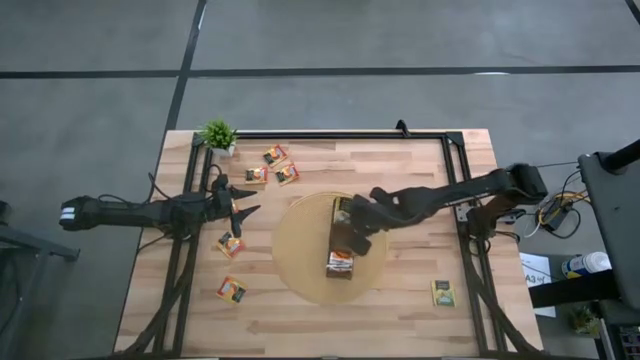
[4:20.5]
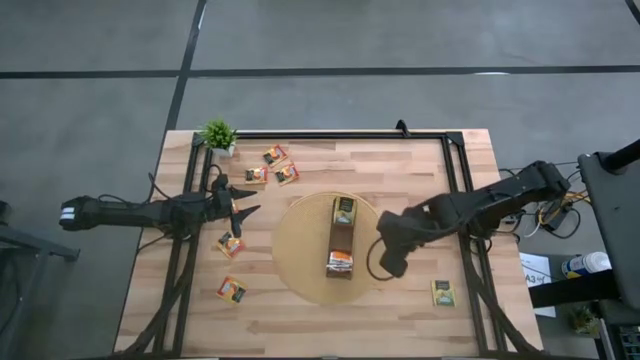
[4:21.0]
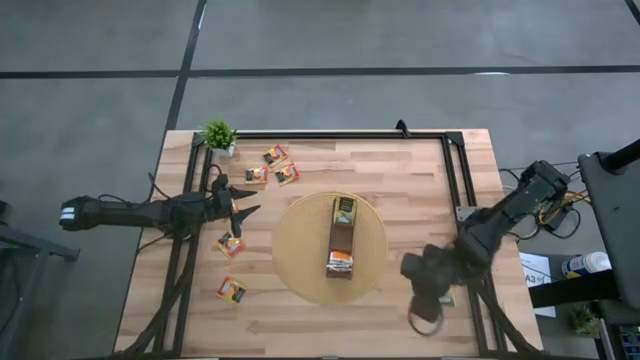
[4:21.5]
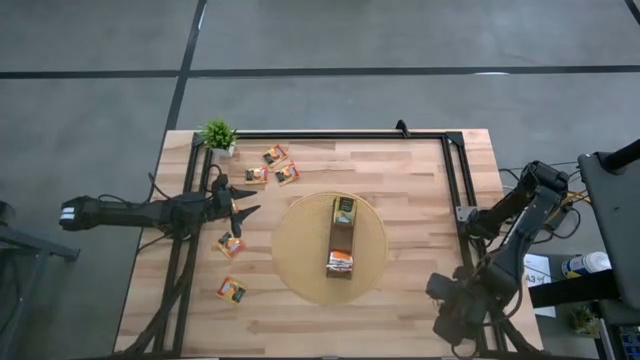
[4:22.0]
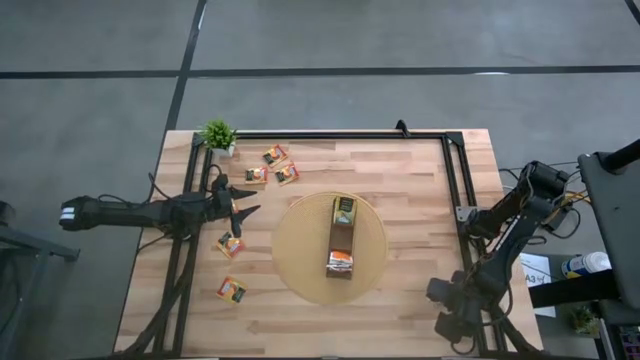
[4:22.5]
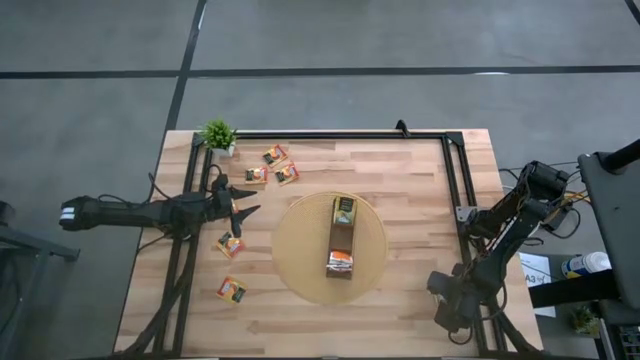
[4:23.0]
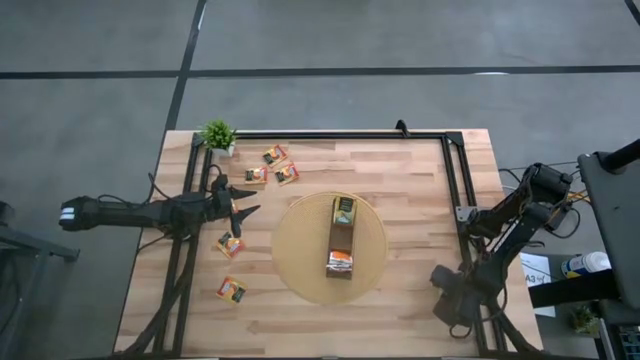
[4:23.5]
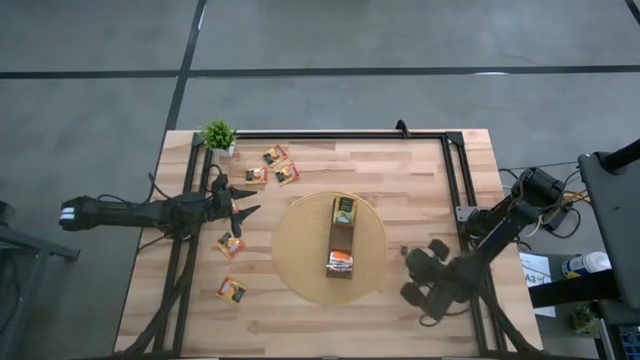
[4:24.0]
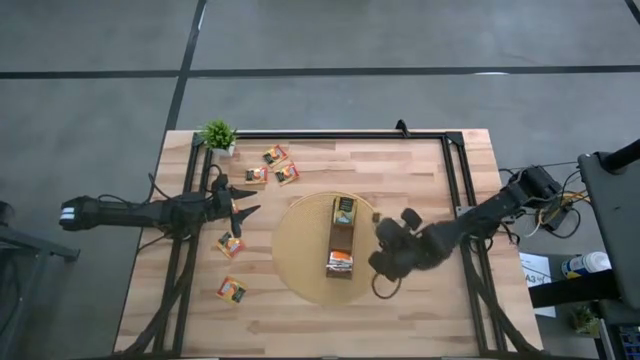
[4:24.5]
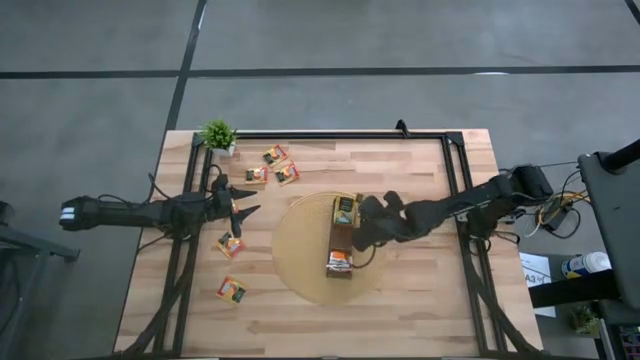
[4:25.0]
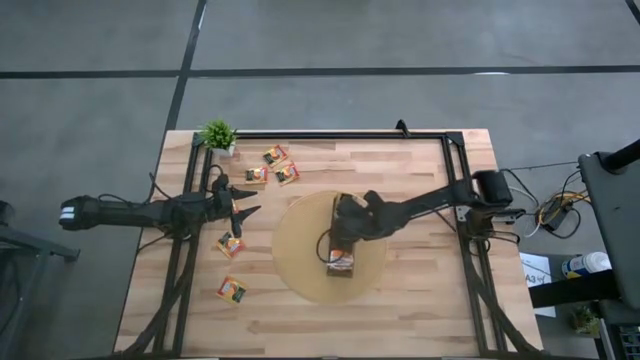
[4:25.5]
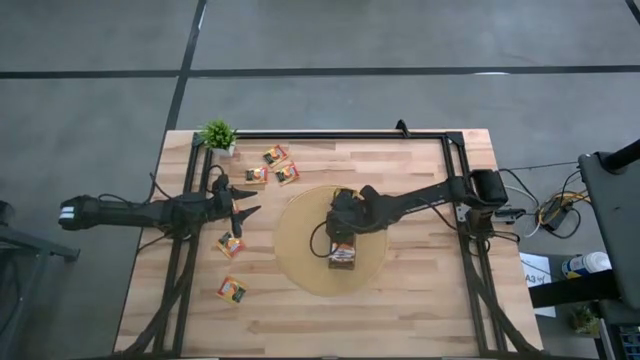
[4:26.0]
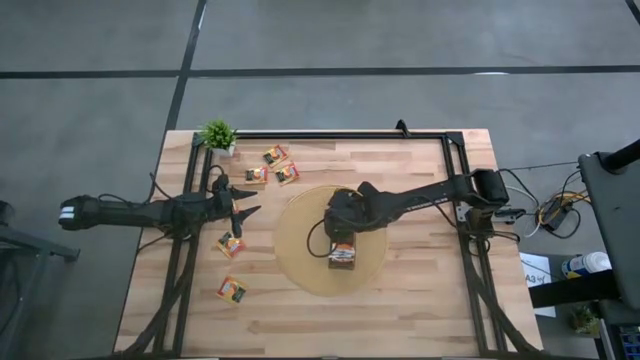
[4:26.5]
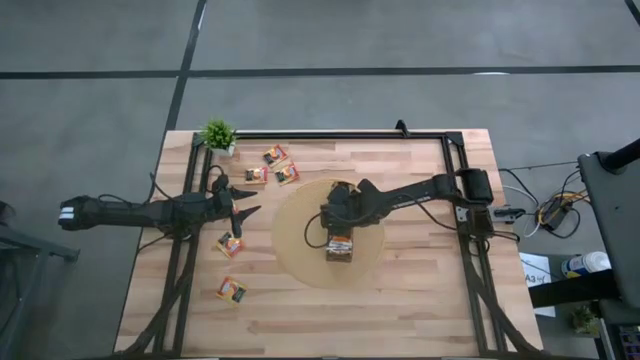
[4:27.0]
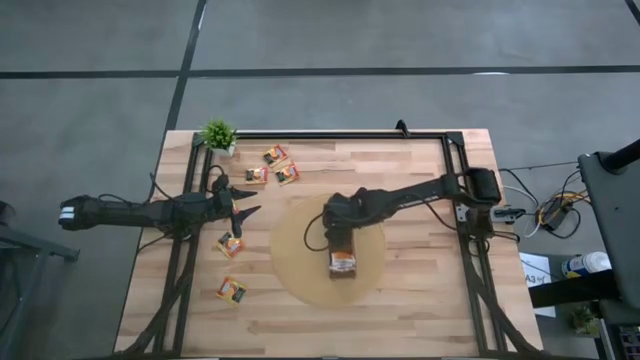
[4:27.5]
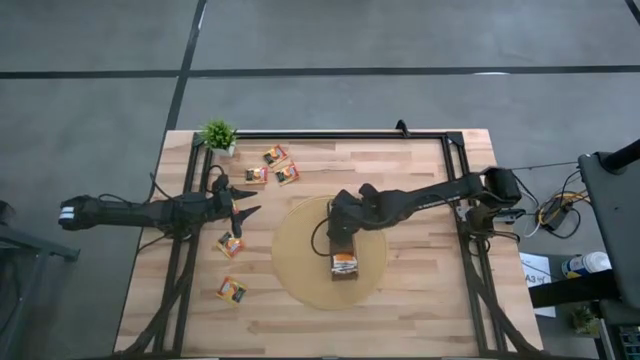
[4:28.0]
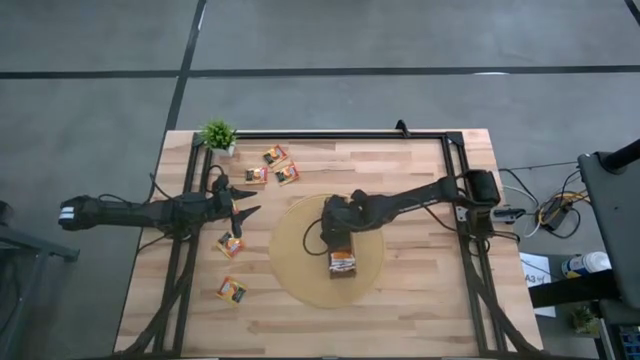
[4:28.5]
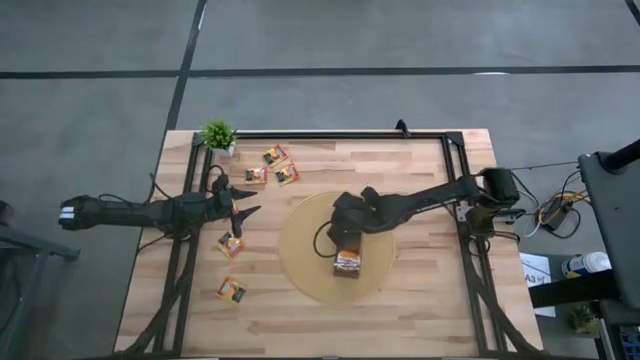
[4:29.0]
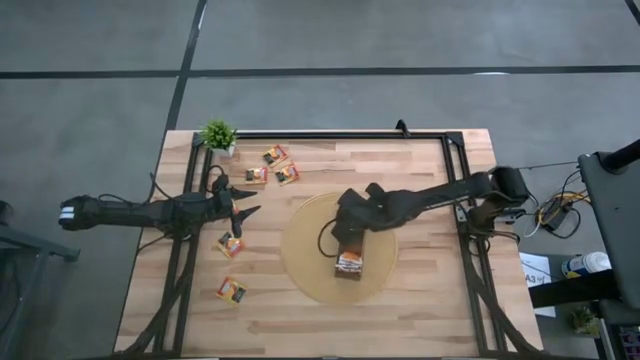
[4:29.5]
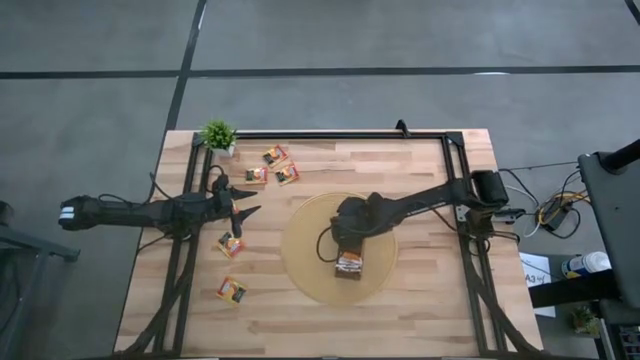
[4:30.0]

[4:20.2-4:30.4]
Task: Pick & Place Tea
Put the yellow tea bag into the top section of the wooden organizer

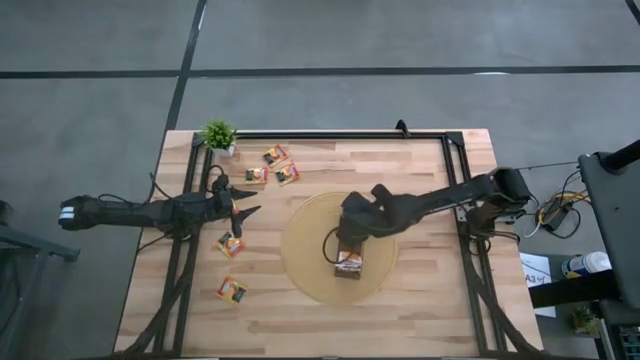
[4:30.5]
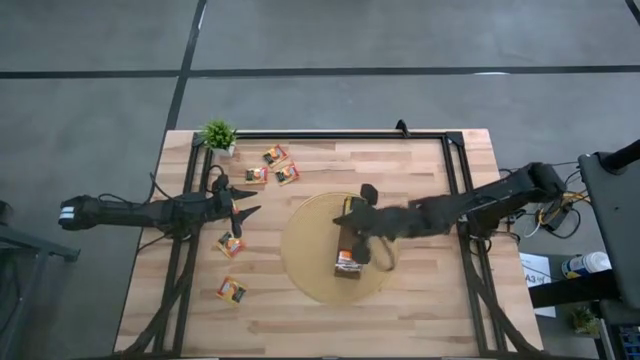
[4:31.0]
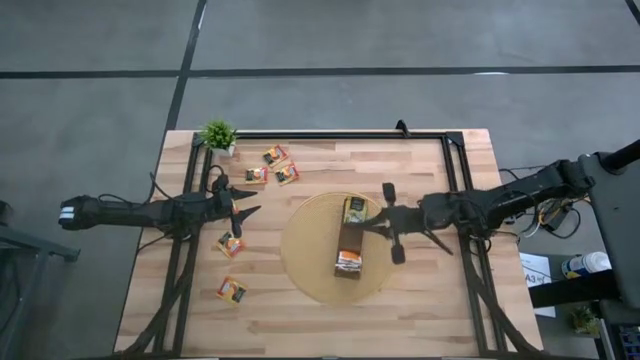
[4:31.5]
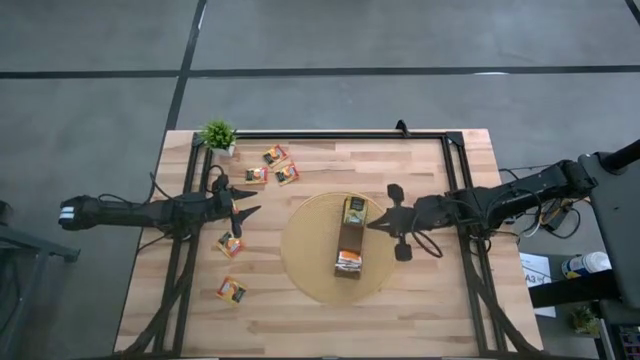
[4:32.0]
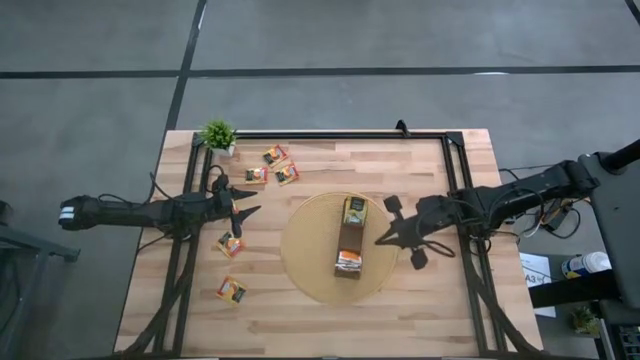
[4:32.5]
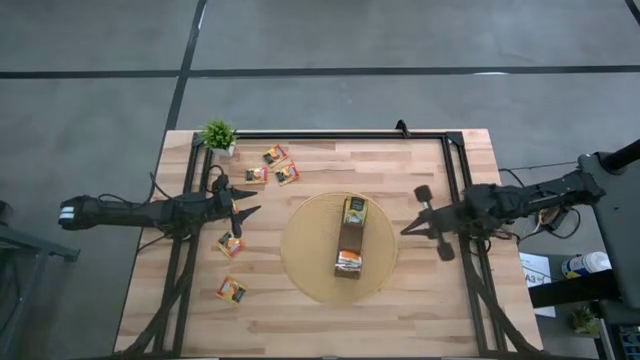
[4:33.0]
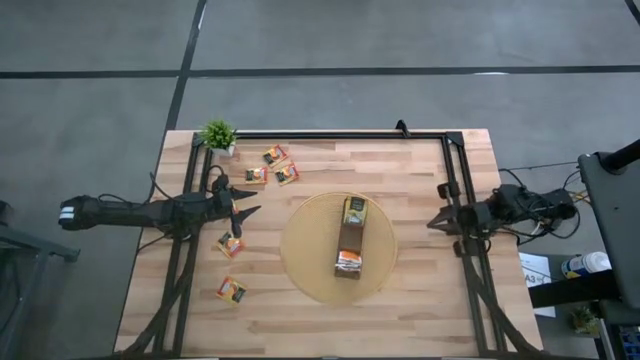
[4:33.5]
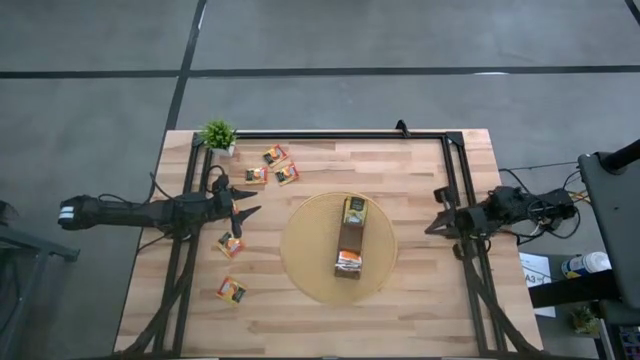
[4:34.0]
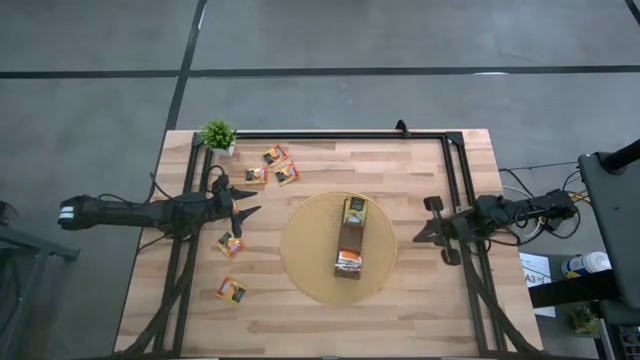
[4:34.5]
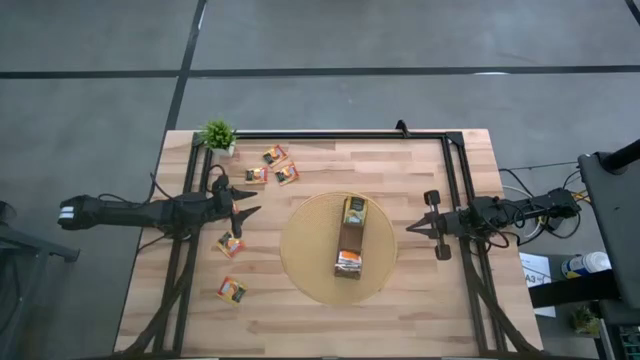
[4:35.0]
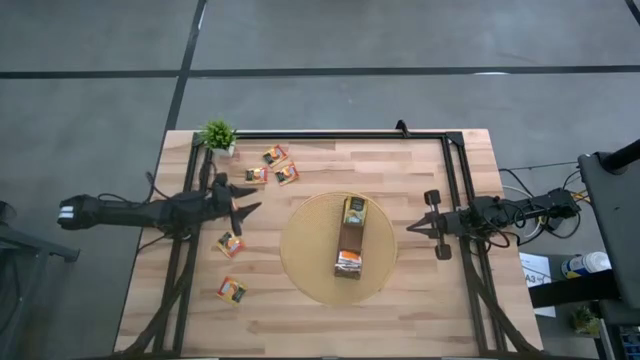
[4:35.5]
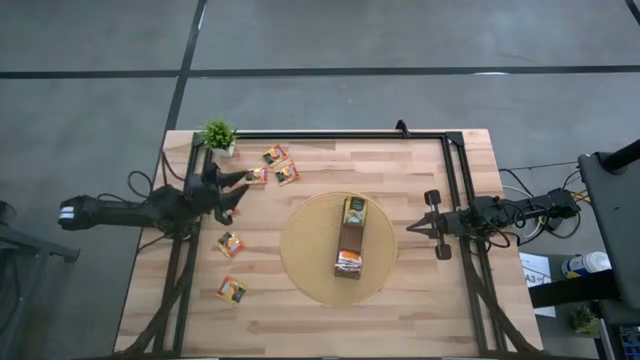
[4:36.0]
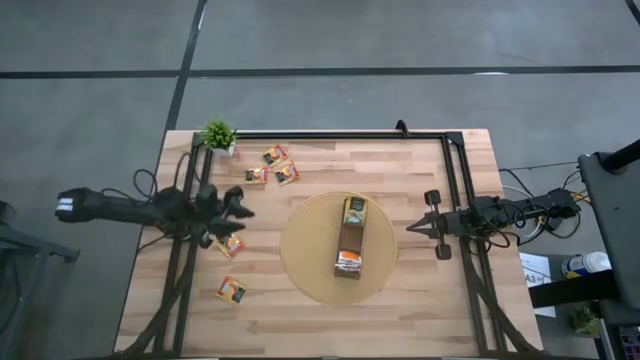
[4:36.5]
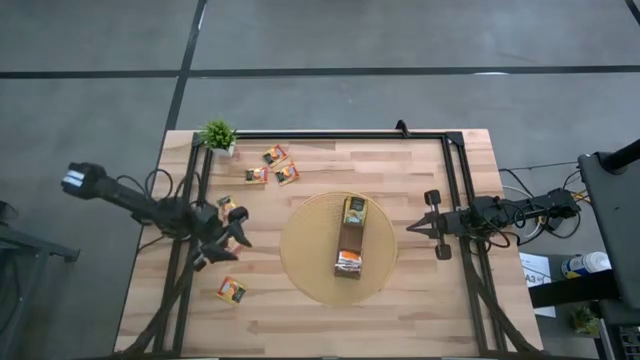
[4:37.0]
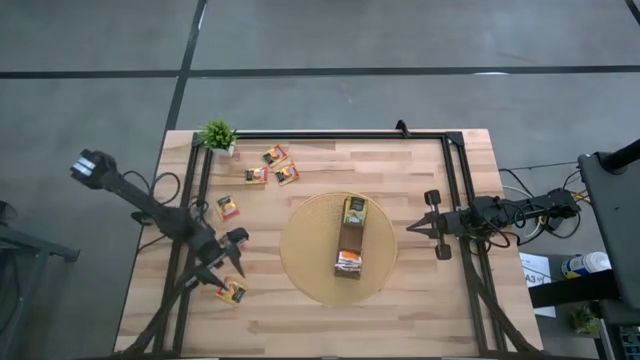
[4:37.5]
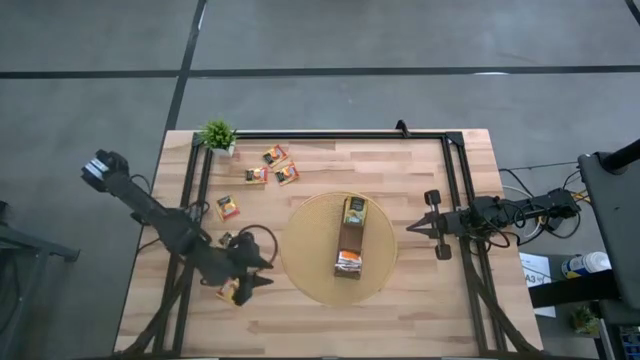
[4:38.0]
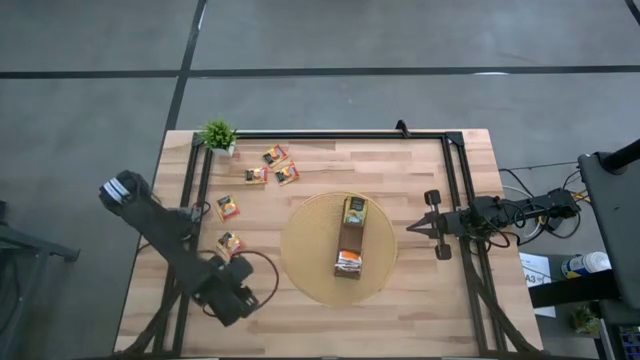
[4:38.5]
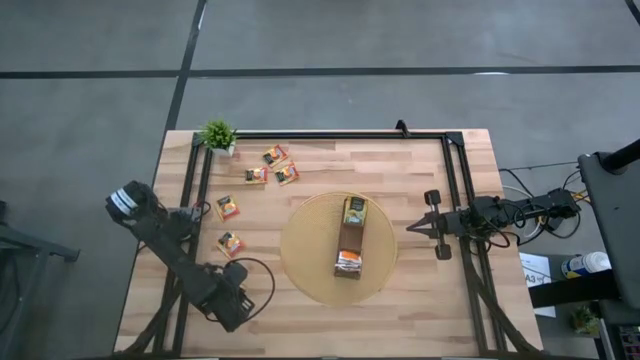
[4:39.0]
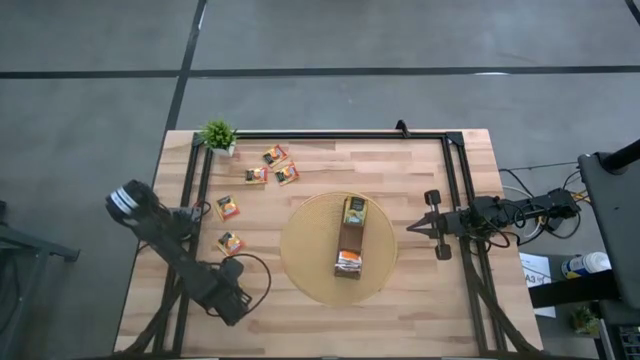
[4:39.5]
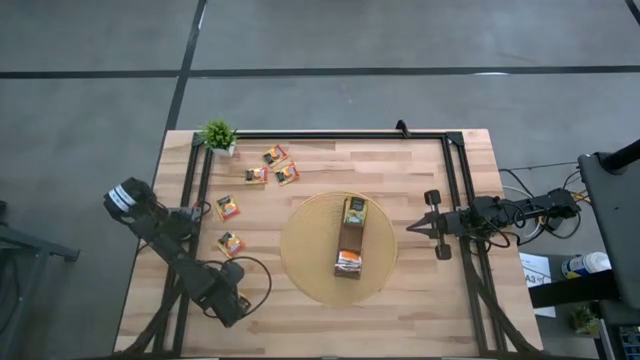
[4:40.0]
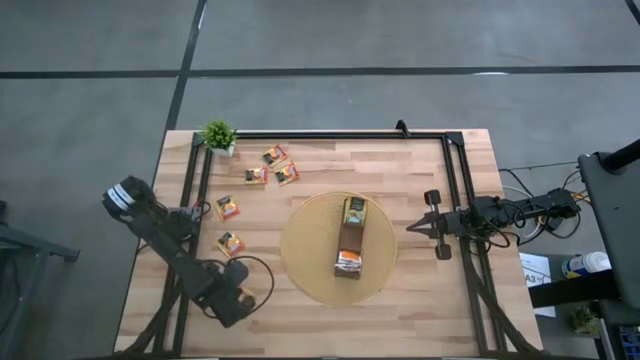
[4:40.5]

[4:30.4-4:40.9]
Put the orange tea bag into the middle section of the wooden organizer

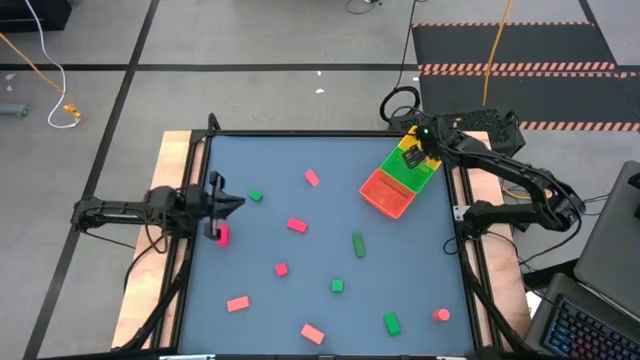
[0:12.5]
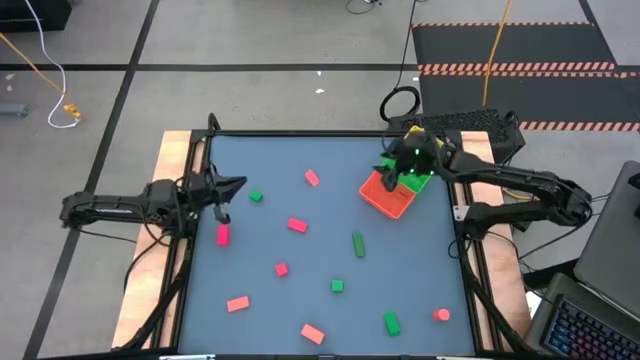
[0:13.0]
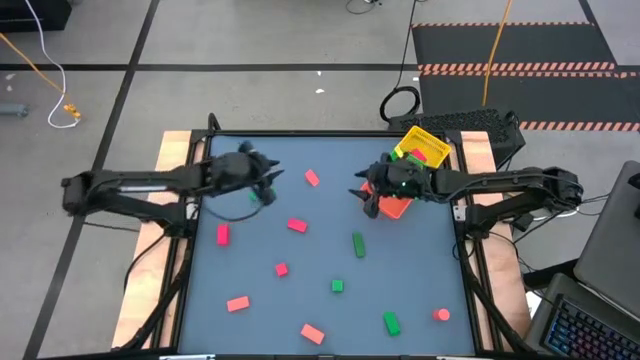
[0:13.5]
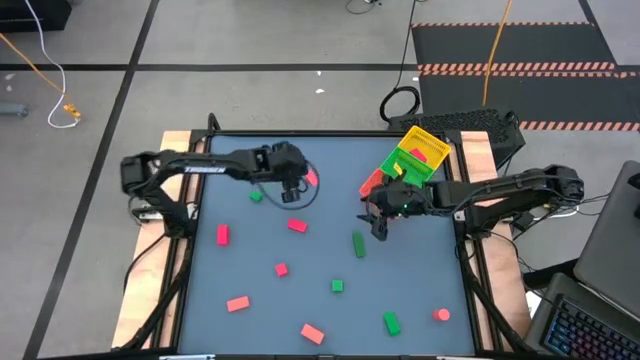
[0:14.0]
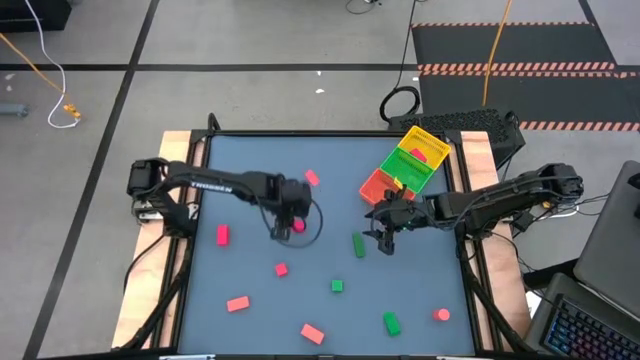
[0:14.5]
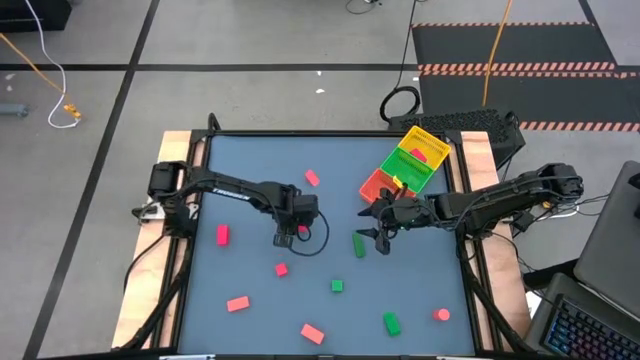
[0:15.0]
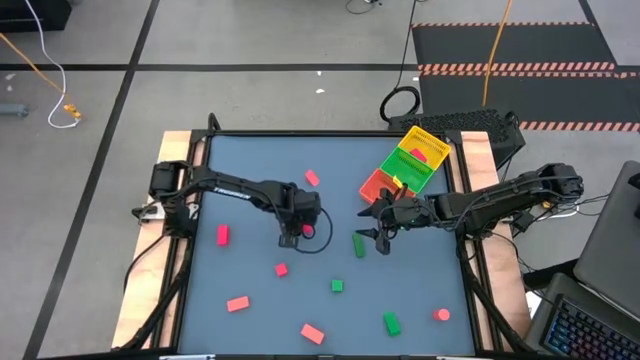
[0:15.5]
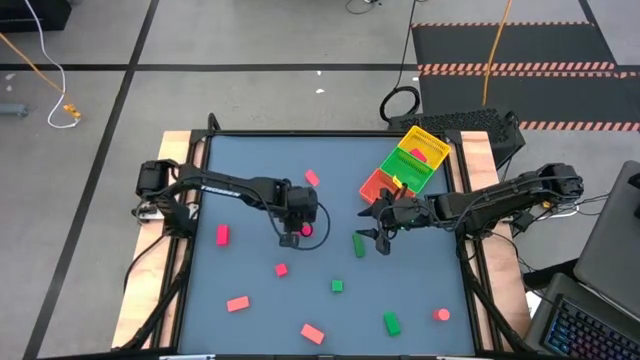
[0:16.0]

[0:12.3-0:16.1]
Task: Sort & place blocks by color
Put the red block into the yellow bin
